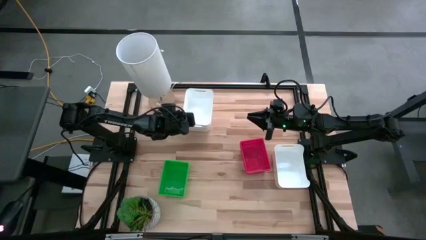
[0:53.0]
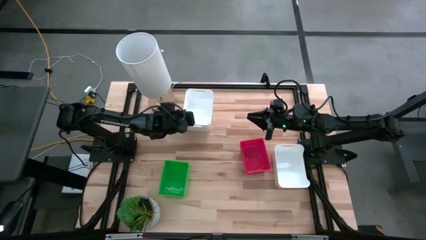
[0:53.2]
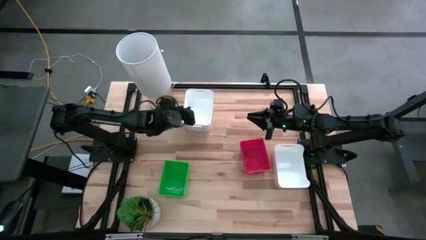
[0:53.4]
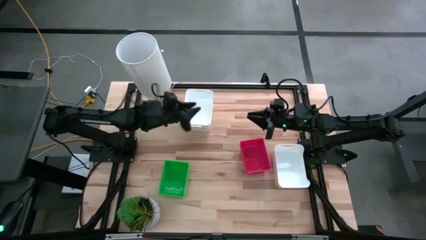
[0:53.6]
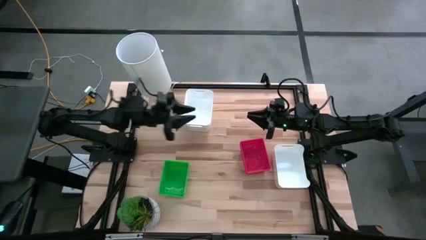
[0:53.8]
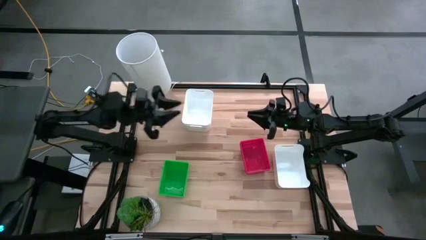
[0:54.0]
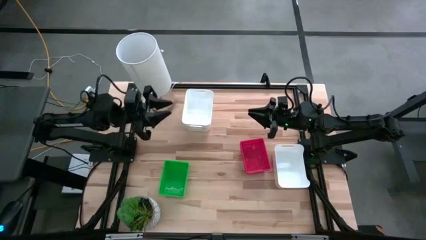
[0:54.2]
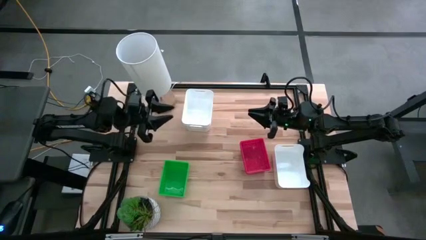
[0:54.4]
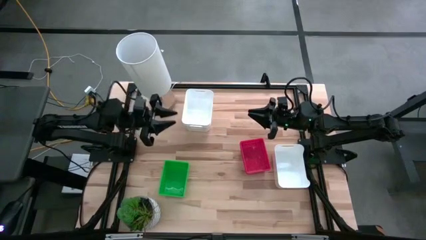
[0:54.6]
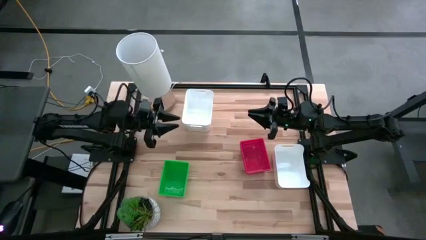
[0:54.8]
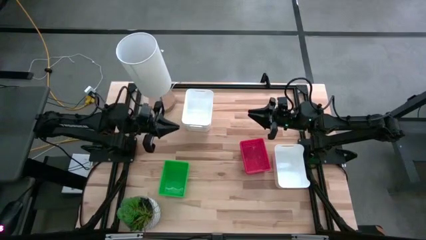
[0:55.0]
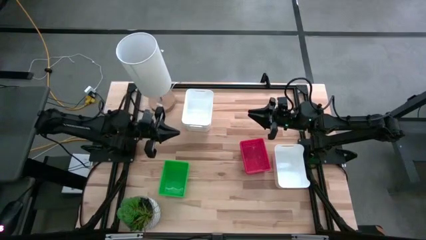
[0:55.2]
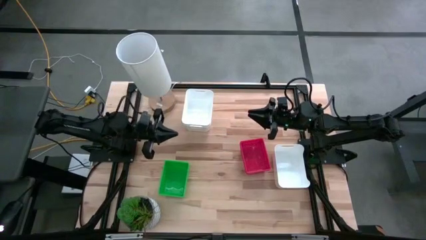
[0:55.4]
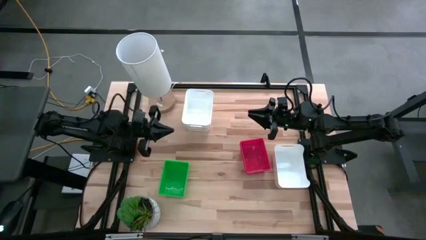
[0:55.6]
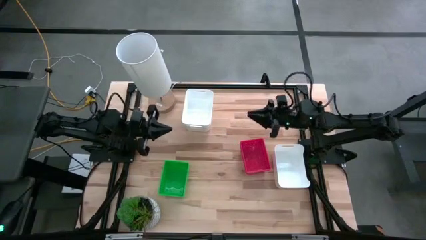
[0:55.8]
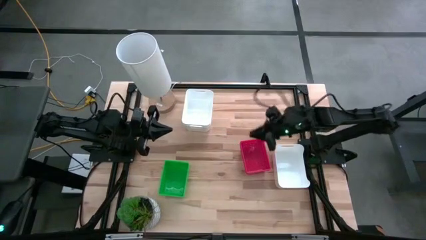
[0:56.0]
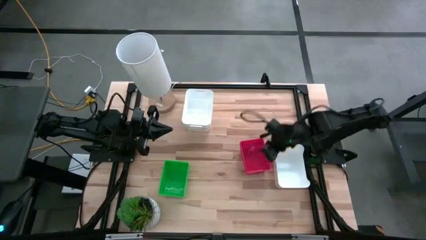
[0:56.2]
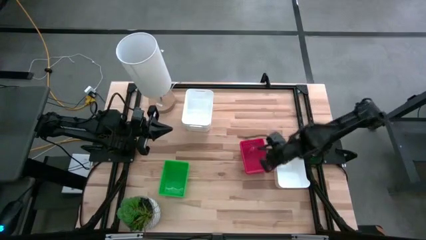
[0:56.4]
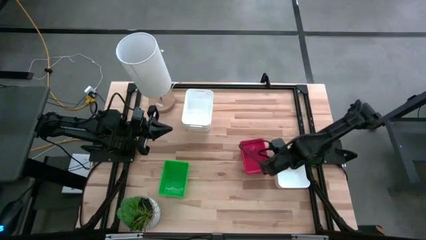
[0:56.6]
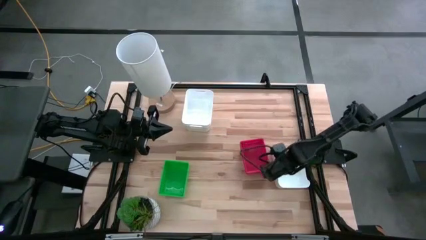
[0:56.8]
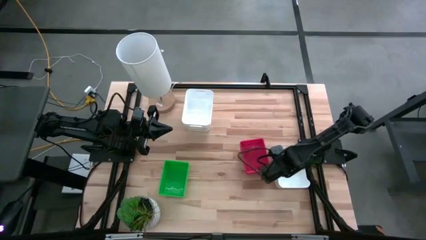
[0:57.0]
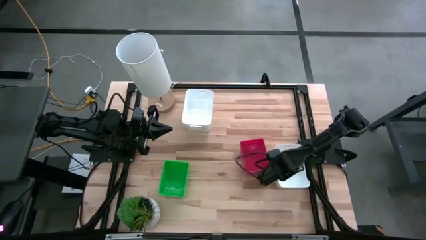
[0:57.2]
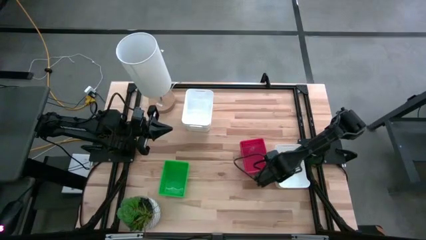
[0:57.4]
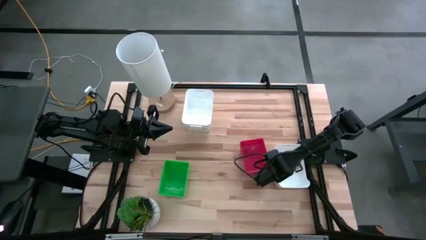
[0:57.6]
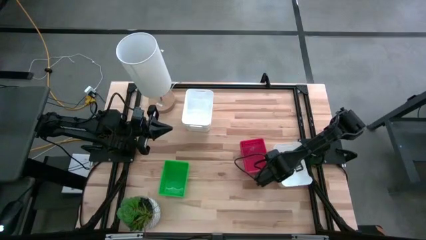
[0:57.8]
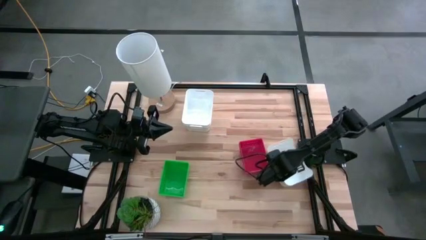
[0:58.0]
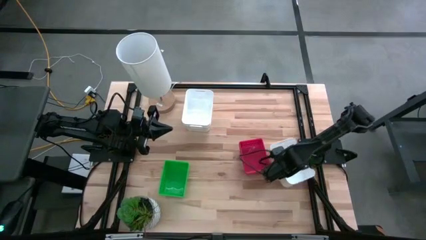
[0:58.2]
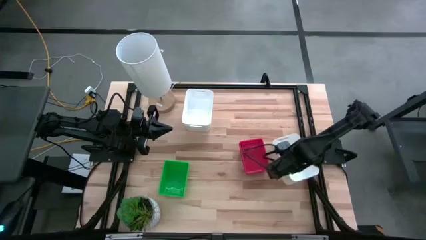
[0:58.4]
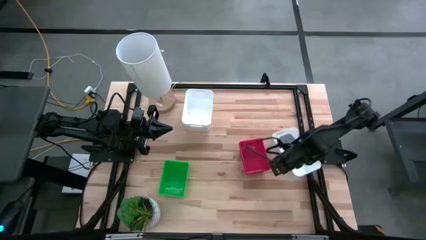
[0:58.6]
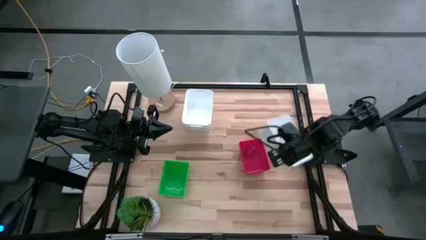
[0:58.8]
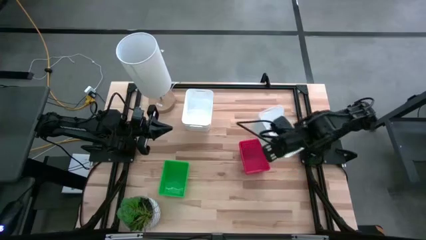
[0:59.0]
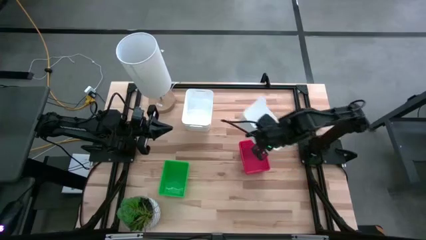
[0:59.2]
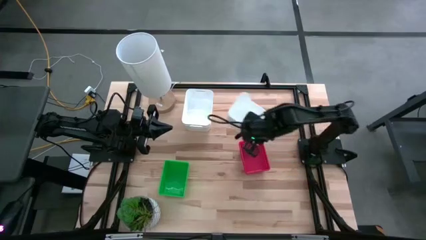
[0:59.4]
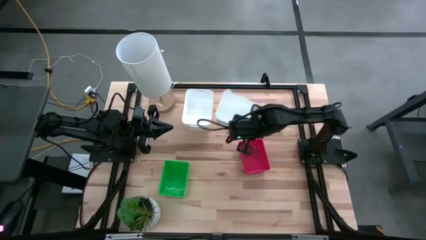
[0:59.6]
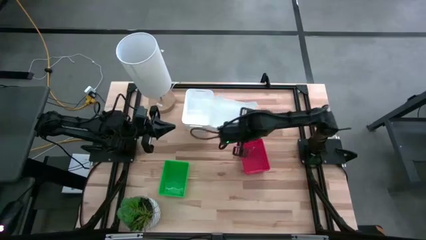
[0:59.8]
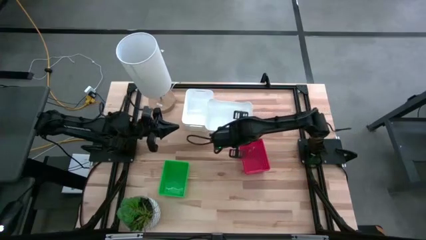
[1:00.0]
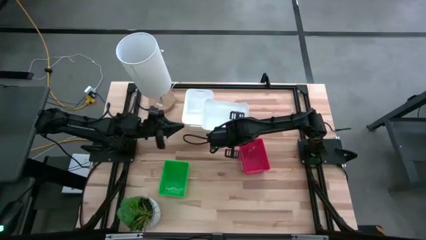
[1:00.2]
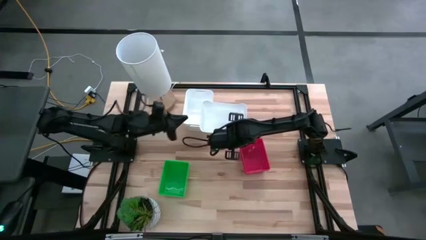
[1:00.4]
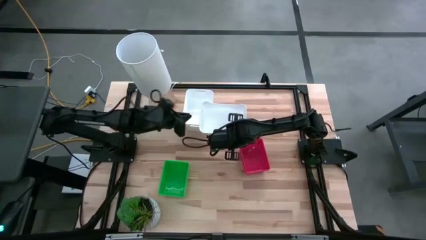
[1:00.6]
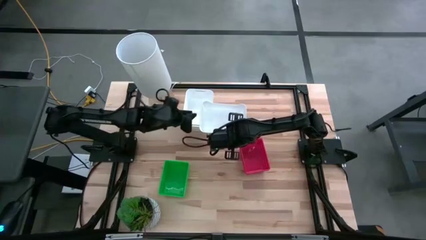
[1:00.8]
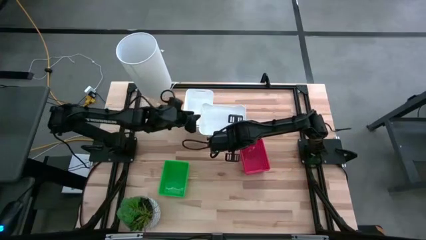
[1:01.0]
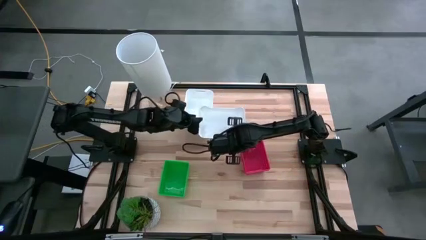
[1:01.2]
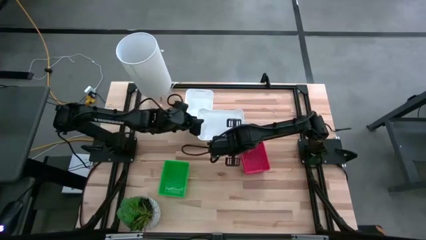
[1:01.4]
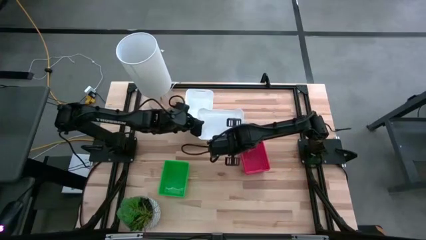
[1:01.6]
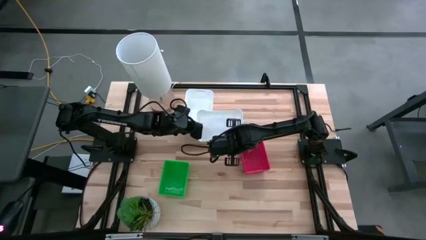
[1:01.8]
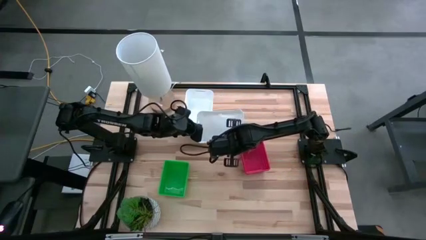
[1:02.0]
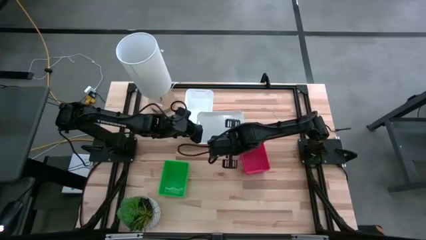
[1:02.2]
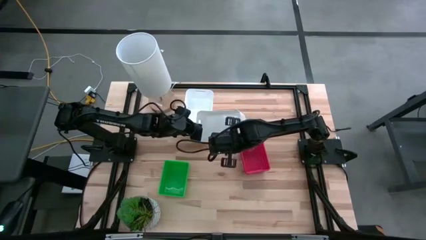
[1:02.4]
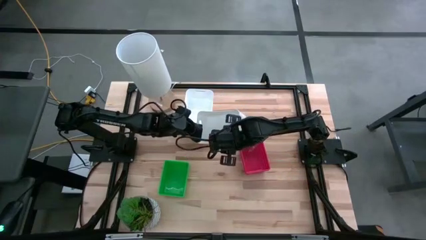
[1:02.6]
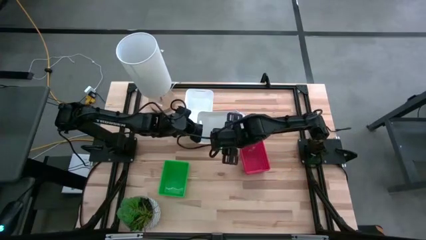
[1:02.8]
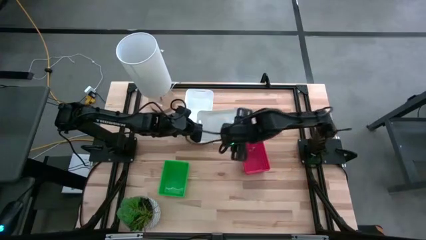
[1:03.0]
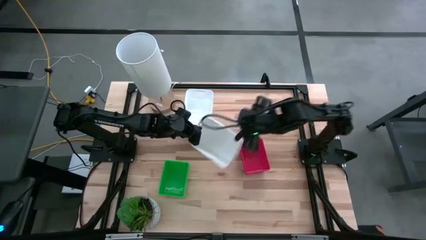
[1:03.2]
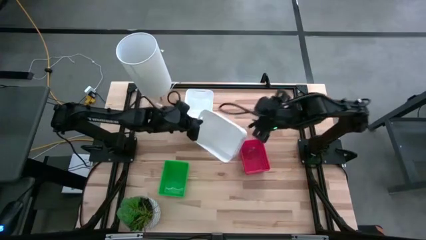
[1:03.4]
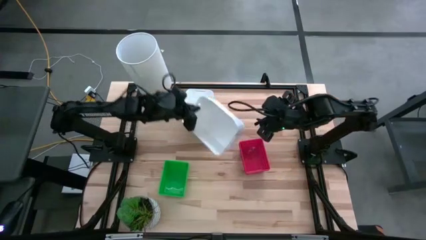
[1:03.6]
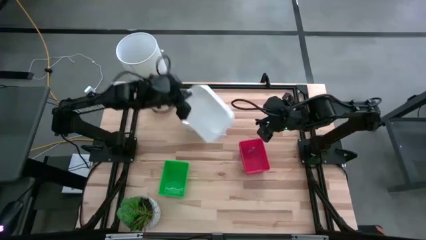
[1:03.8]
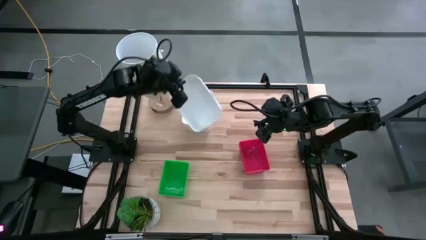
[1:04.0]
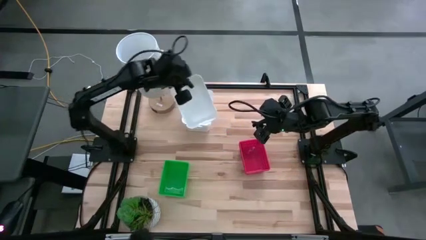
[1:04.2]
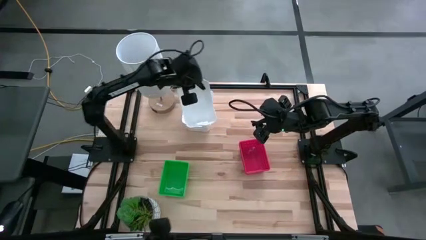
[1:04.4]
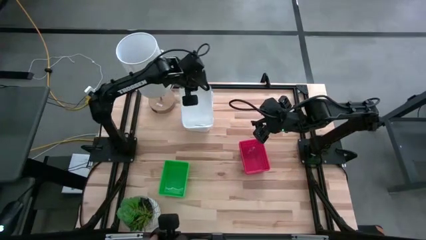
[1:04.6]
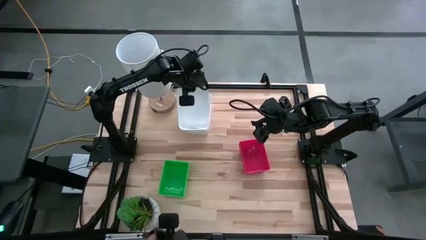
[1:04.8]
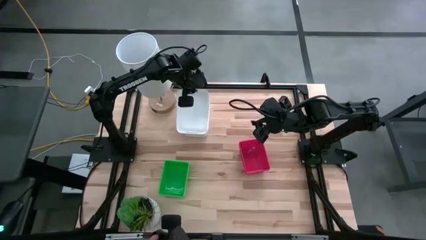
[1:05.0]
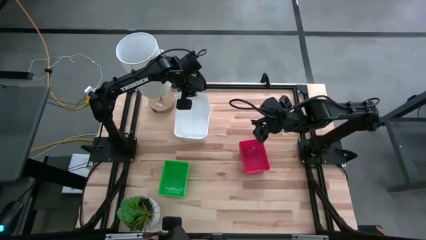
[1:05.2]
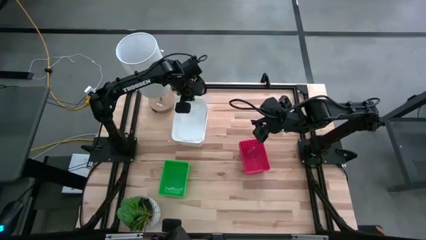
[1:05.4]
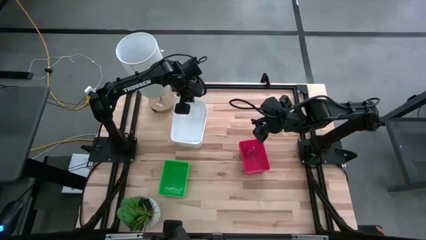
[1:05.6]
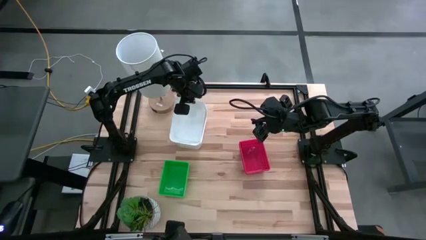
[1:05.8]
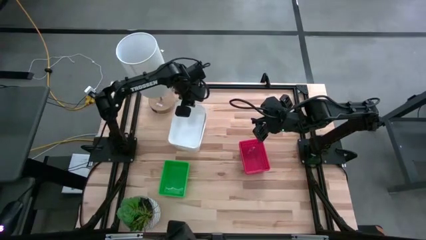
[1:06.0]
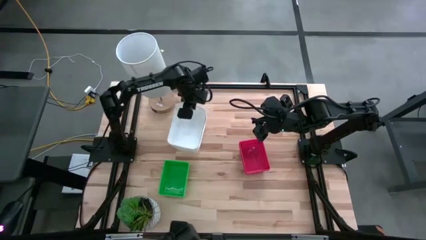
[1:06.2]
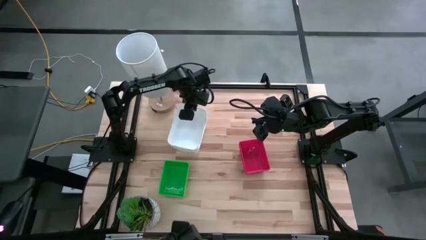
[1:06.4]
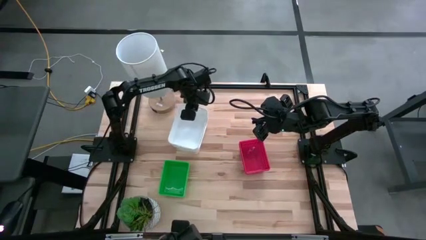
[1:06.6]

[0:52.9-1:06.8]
Stack the bottom white bin on the top white bins
